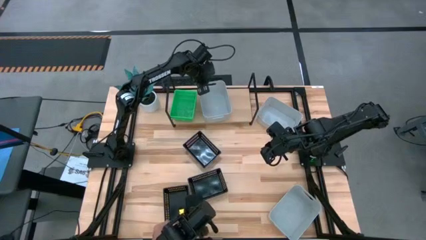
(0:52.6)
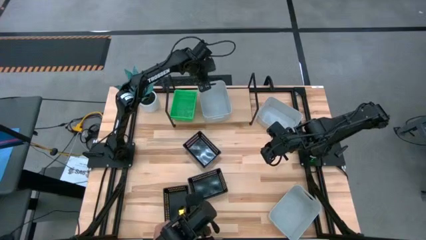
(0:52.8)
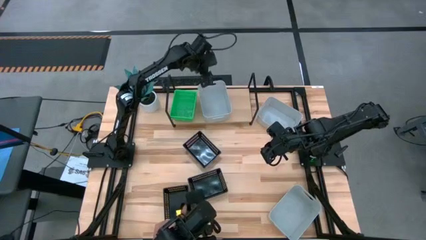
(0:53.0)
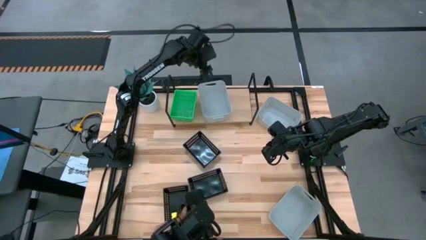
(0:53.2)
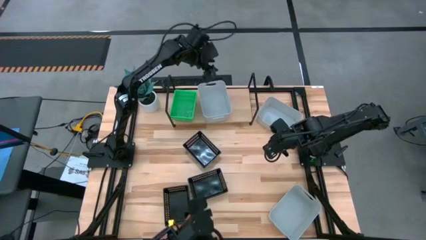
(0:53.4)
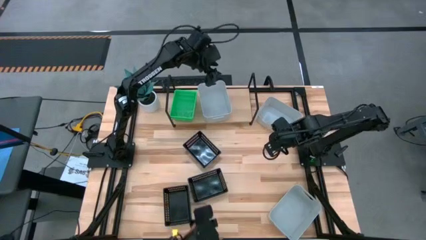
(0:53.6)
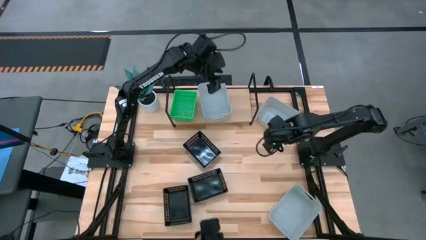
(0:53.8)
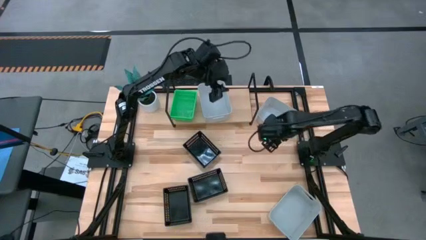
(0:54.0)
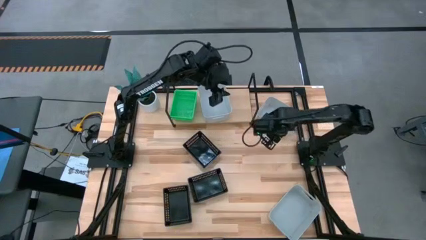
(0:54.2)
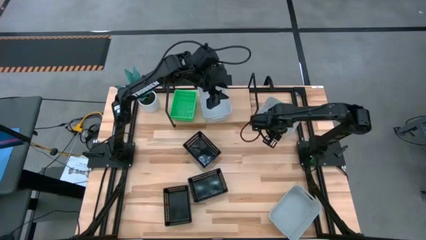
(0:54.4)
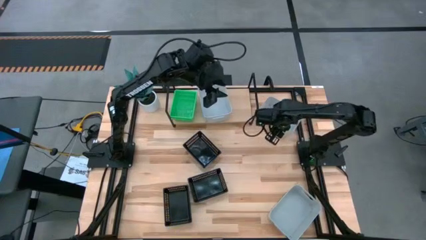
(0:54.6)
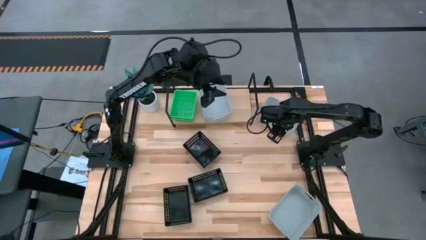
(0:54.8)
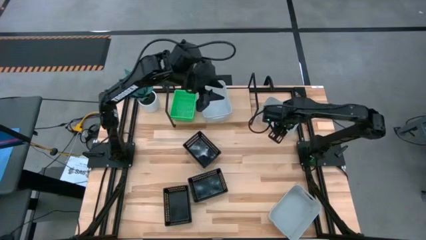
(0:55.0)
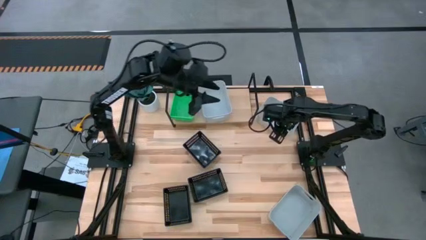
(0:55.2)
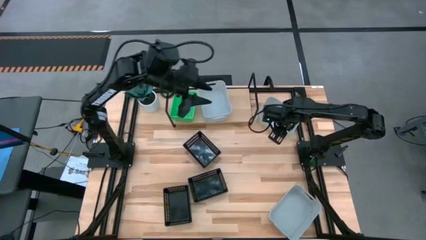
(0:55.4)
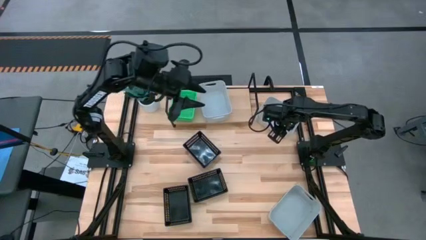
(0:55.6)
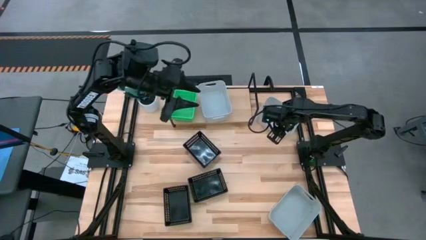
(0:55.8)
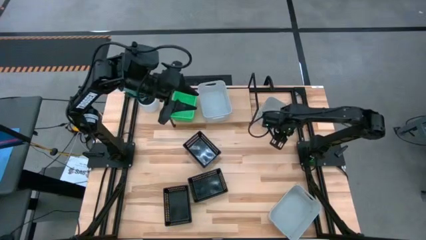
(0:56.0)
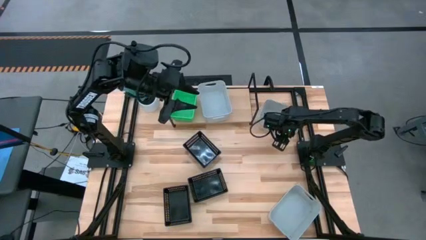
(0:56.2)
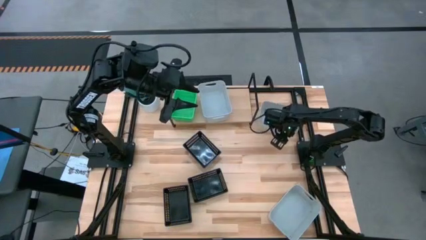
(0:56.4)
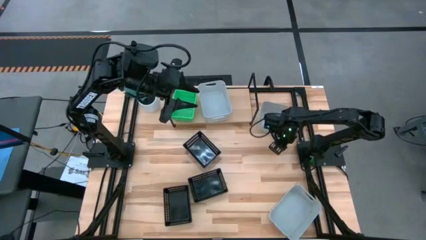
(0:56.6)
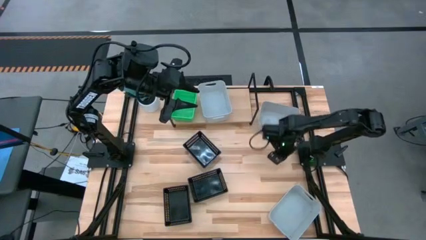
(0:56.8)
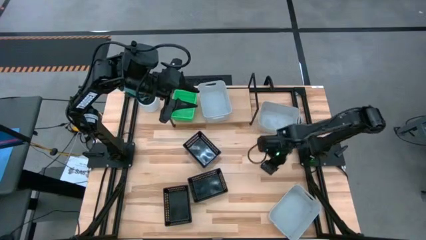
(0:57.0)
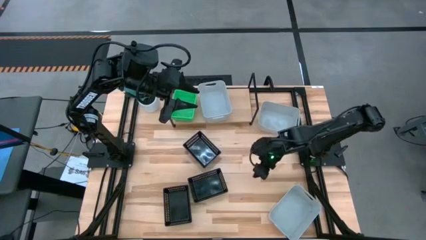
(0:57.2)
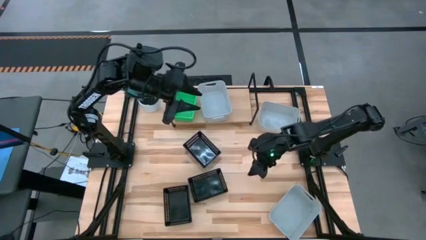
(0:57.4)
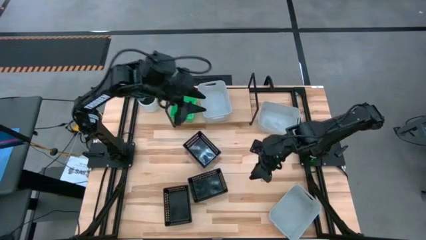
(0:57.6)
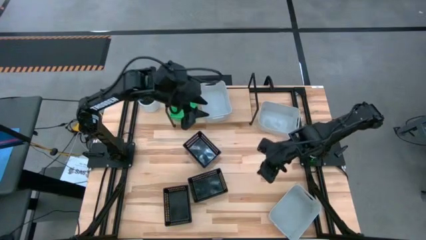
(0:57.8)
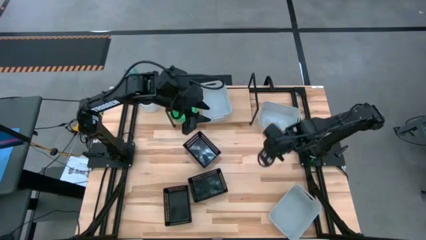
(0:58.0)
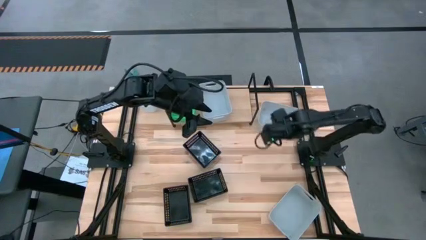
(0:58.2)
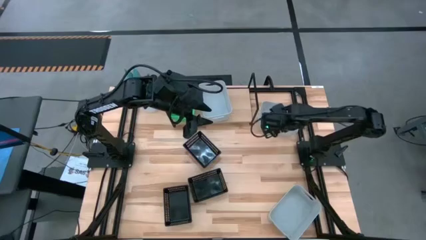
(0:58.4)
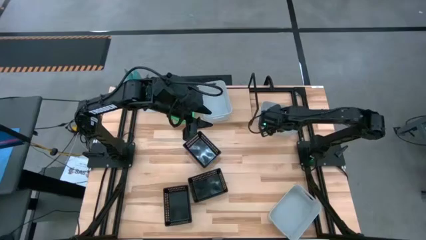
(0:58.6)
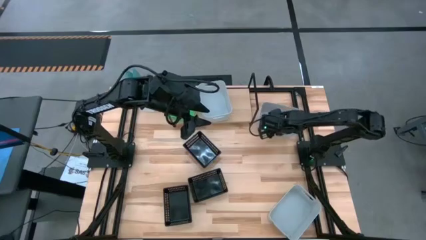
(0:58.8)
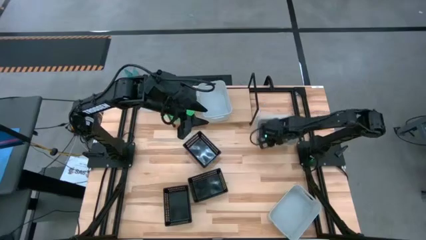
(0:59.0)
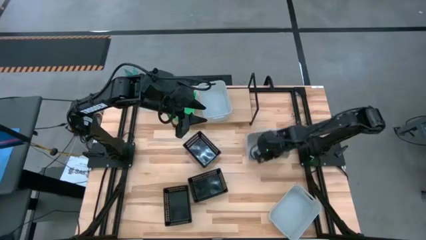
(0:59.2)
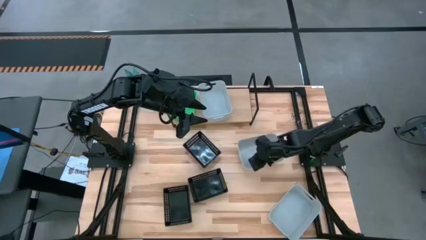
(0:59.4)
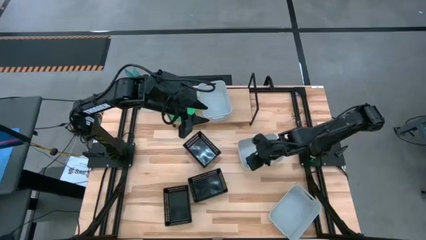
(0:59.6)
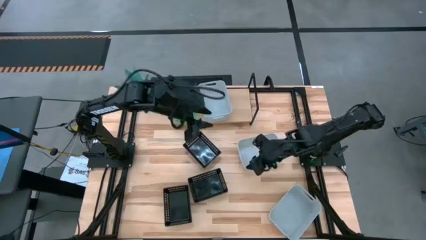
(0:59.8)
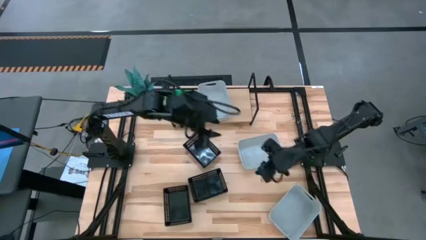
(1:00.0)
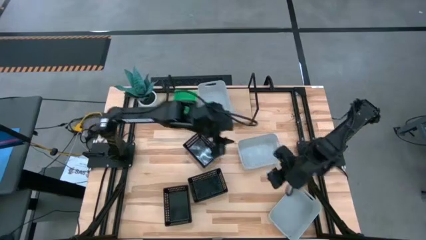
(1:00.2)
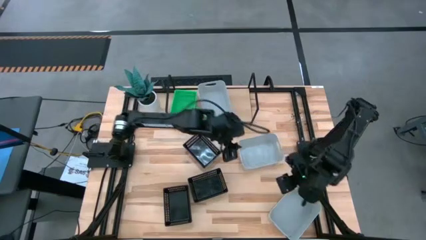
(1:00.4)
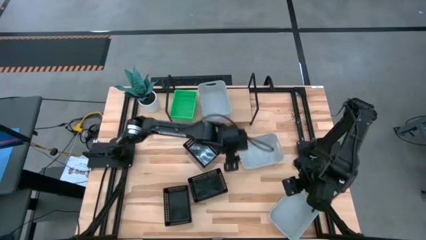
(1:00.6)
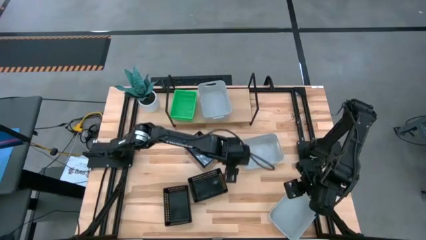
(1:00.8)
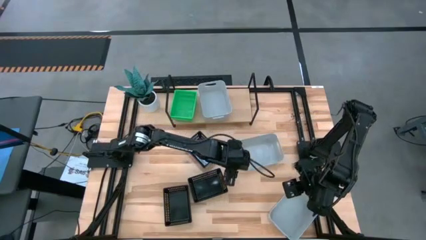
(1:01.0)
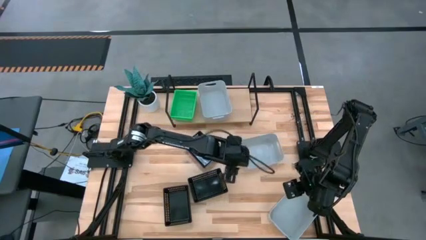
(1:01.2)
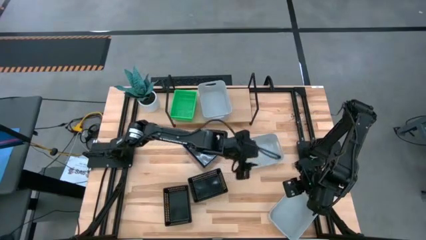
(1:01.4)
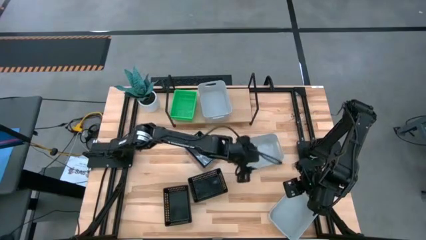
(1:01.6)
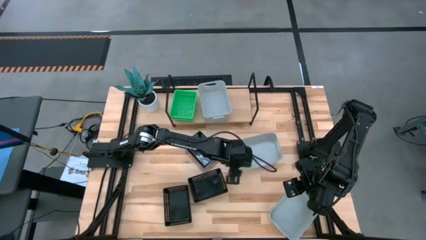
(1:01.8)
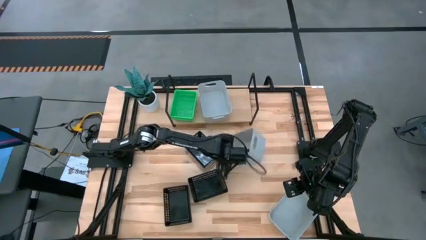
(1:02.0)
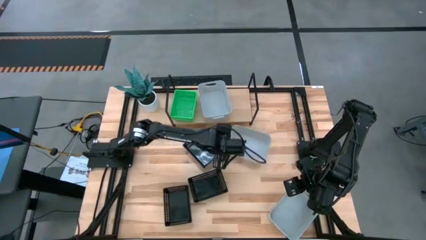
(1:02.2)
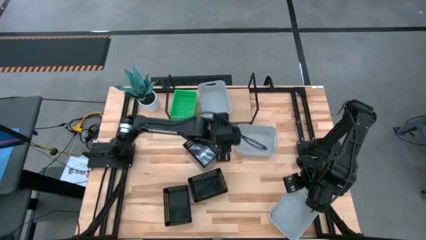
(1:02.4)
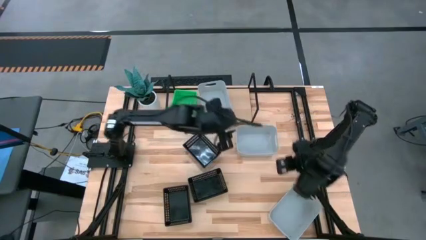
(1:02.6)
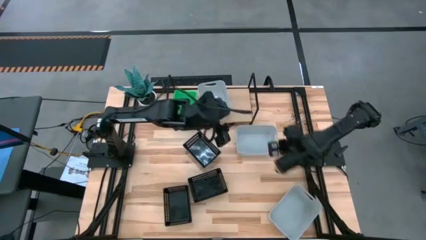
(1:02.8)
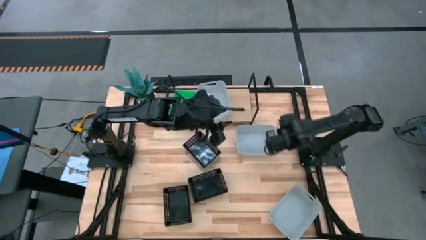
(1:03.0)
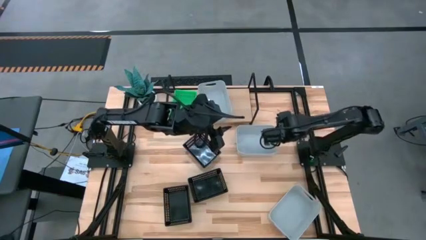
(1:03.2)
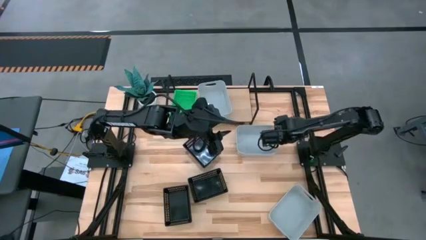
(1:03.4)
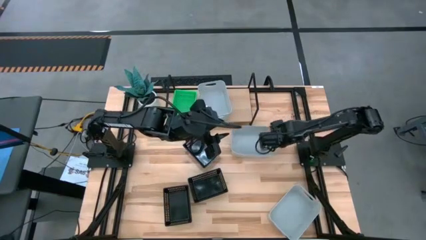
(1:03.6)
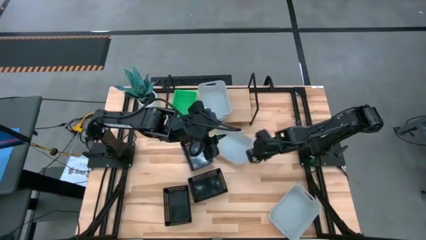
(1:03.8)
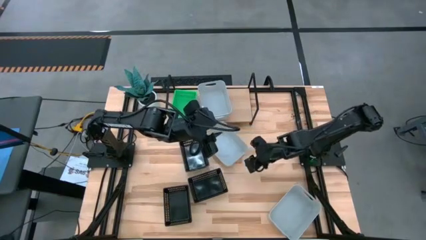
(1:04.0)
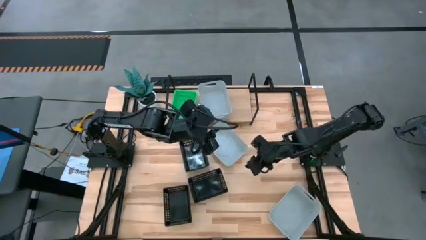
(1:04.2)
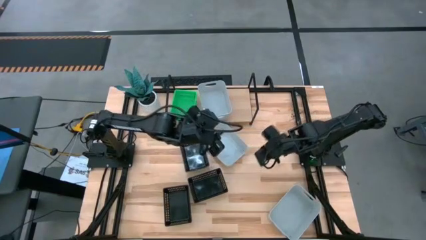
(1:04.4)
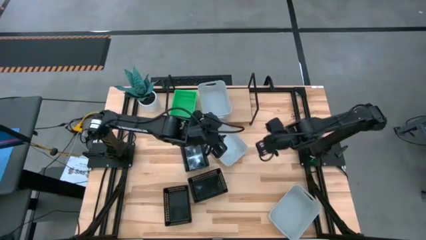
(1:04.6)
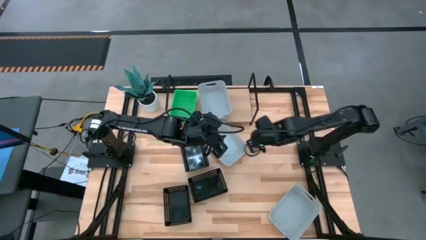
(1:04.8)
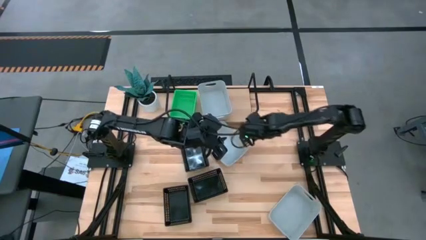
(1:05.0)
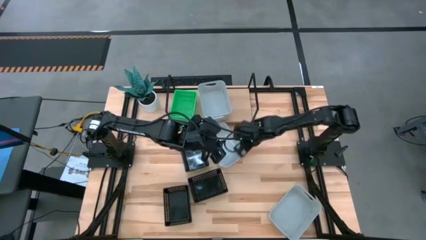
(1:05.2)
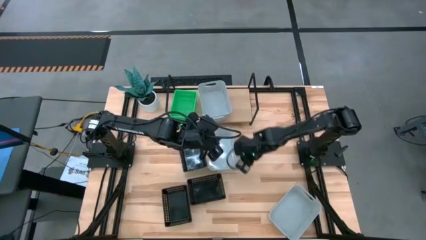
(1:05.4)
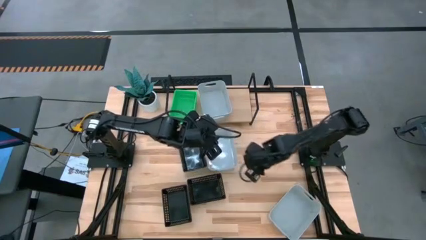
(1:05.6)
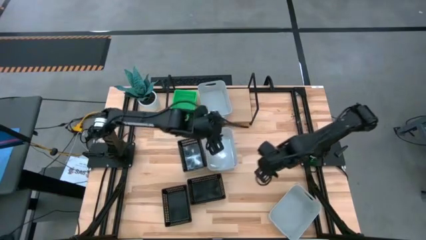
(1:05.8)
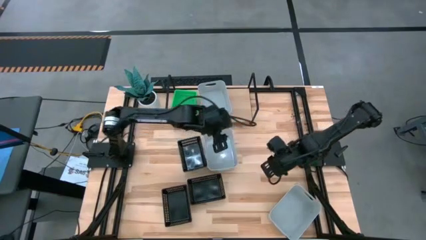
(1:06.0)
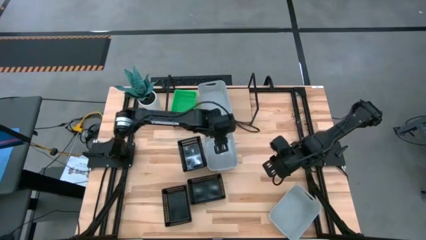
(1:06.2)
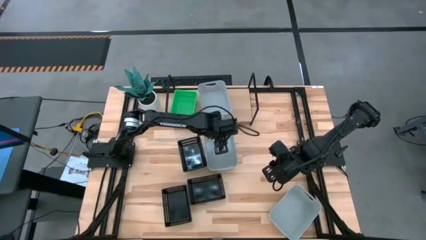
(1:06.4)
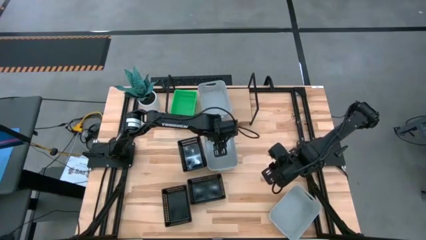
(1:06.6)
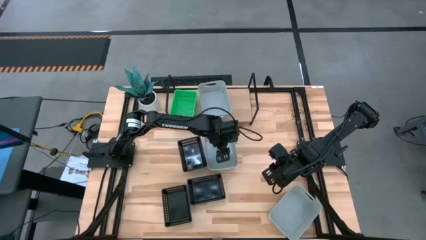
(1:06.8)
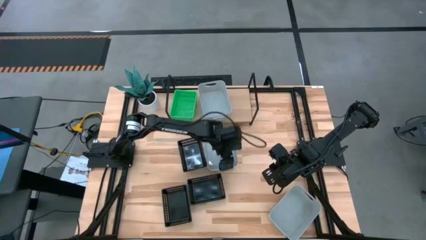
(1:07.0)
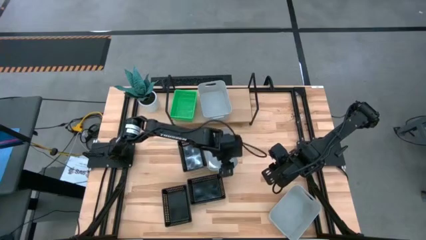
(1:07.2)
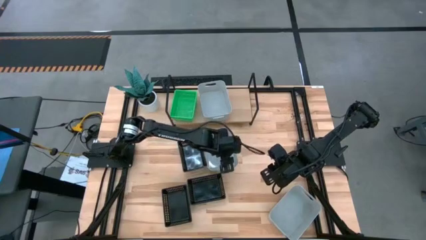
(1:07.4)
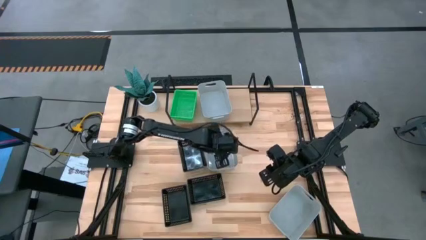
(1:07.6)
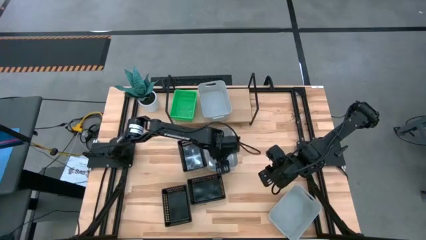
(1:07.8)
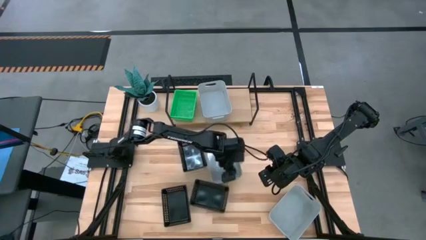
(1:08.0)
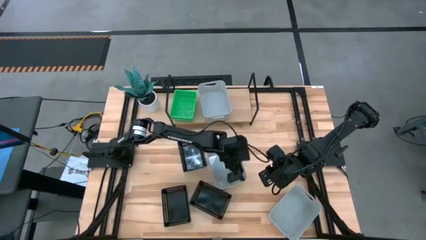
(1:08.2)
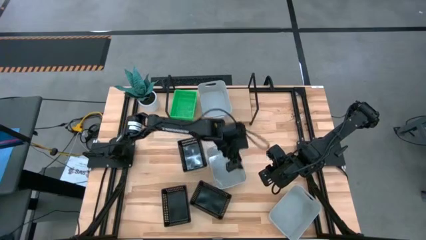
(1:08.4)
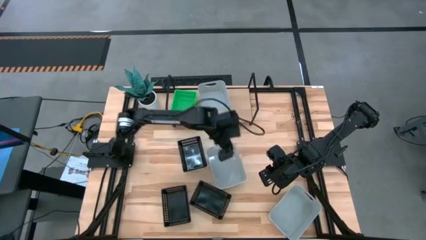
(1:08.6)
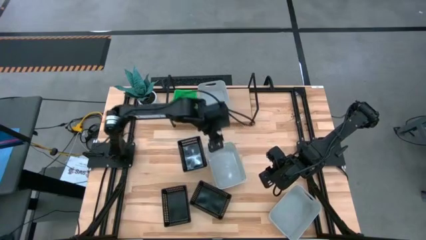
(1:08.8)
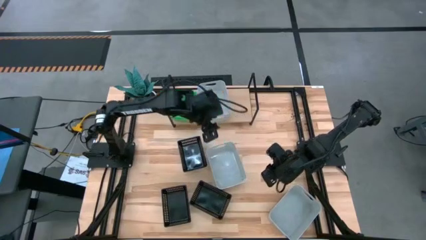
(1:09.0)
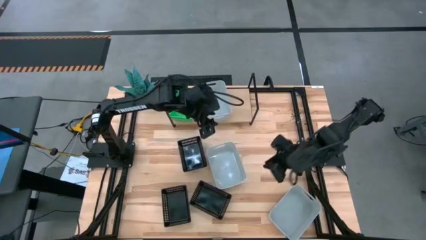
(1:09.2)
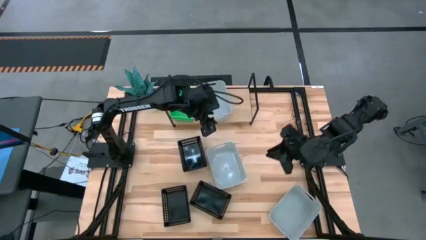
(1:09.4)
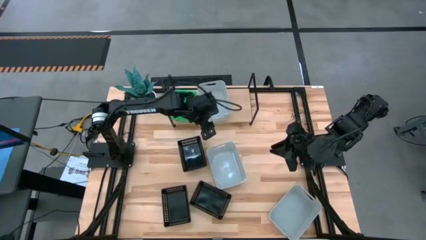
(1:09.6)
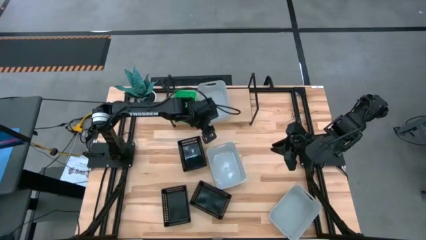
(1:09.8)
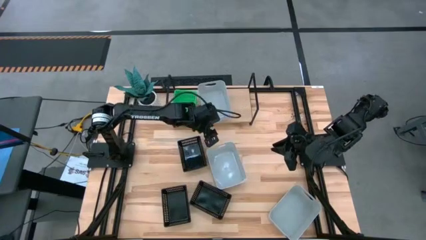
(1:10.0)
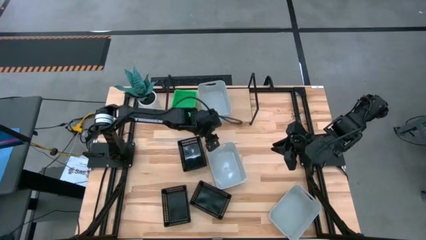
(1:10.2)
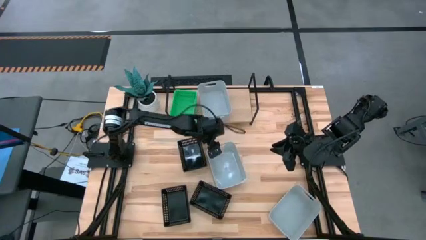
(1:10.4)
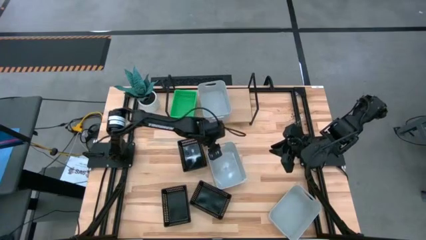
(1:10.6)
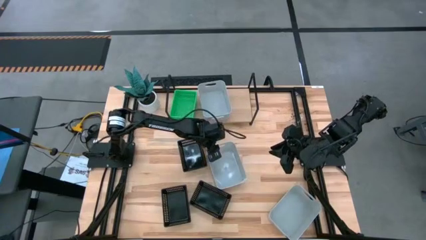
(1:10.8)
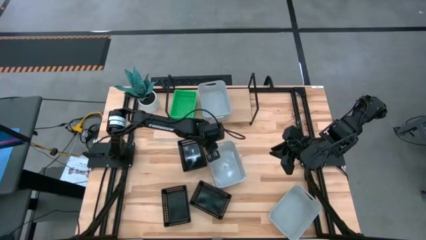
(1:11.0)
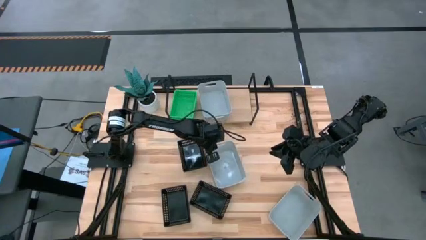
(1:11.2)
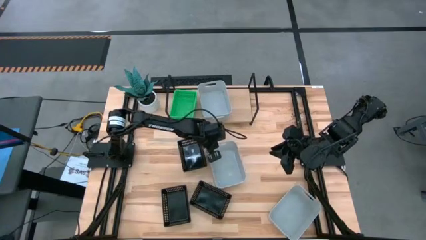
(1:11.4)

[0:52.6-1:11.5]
Task: Stack baskets on shelf by color
Stack the top gray bin on top of the gray bin on the shelf
